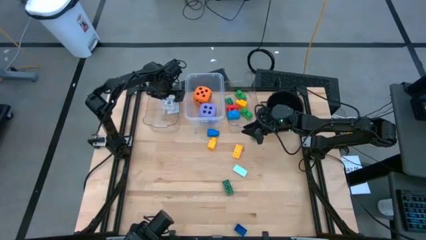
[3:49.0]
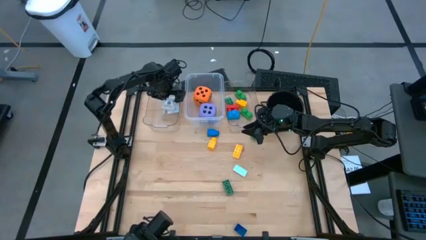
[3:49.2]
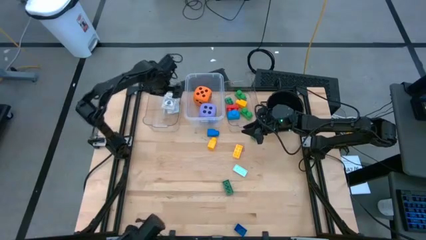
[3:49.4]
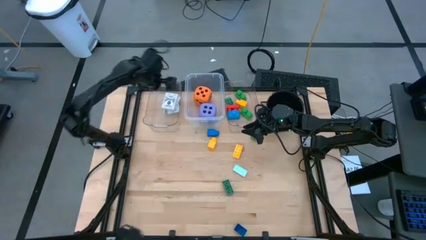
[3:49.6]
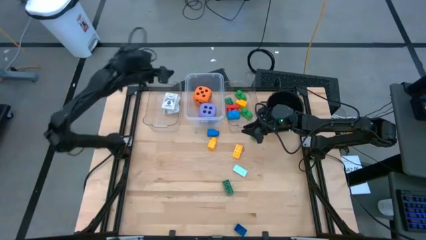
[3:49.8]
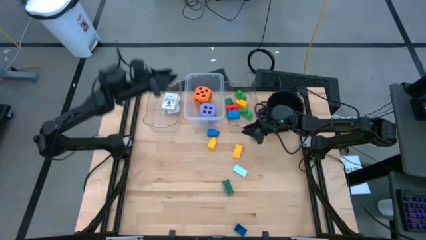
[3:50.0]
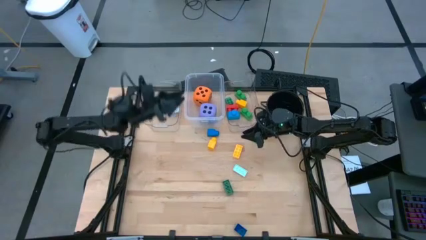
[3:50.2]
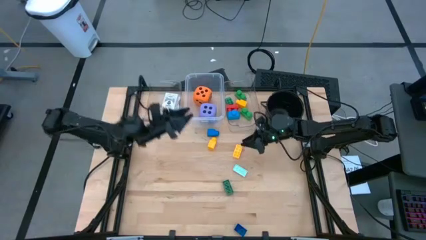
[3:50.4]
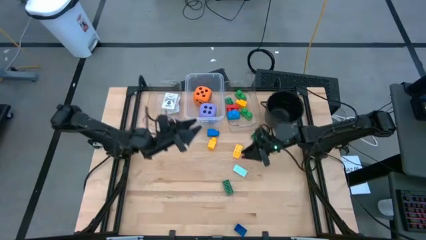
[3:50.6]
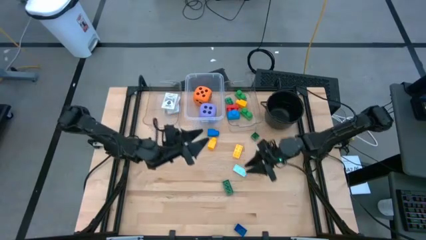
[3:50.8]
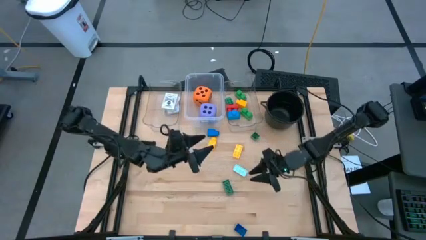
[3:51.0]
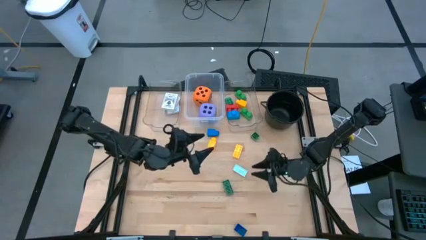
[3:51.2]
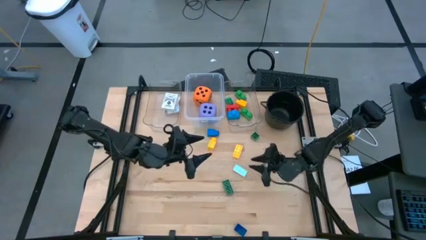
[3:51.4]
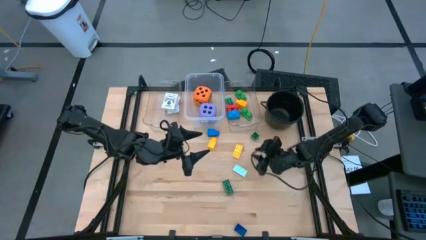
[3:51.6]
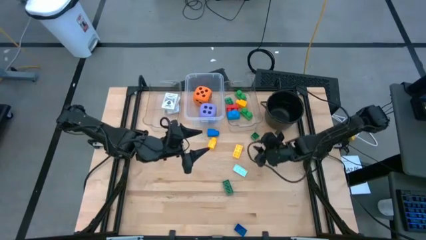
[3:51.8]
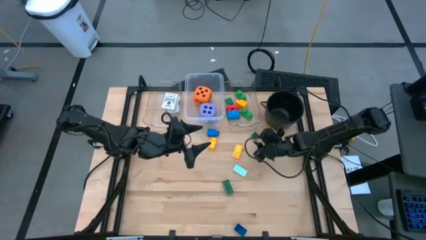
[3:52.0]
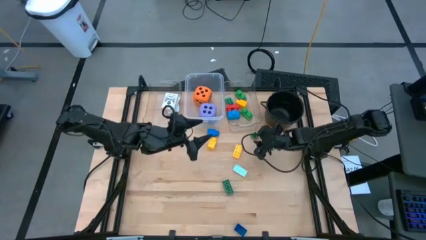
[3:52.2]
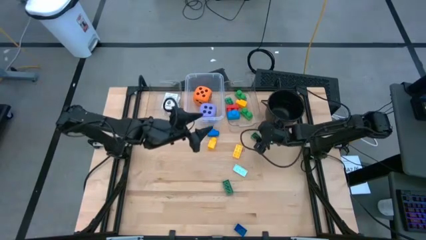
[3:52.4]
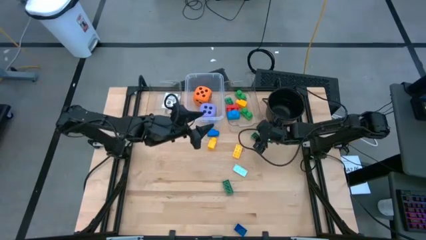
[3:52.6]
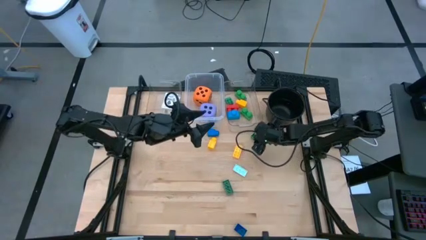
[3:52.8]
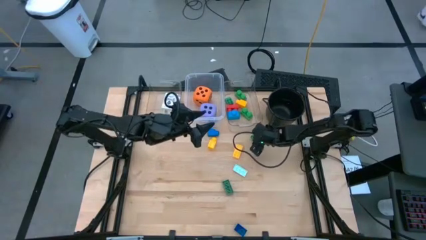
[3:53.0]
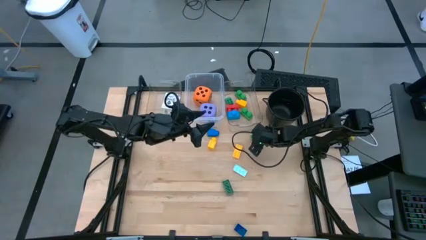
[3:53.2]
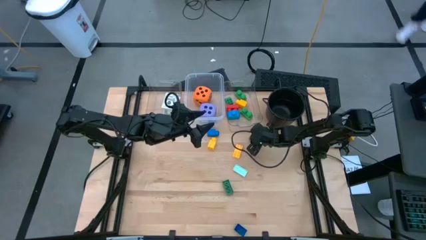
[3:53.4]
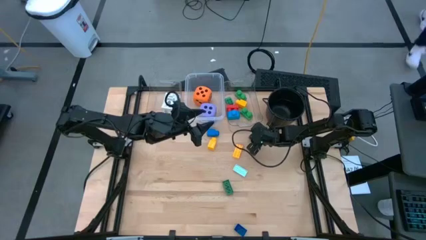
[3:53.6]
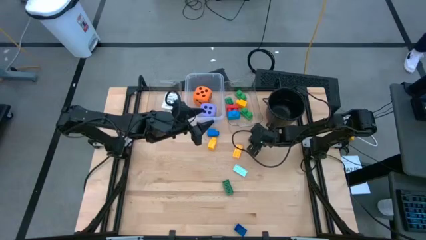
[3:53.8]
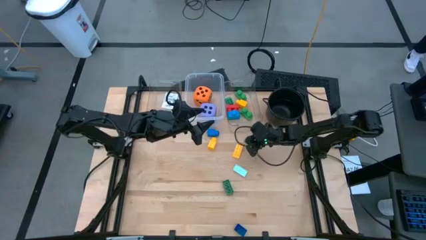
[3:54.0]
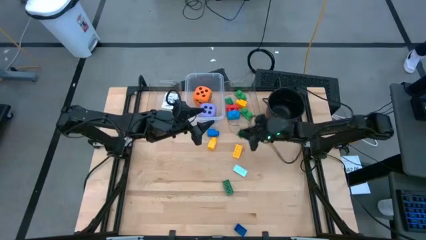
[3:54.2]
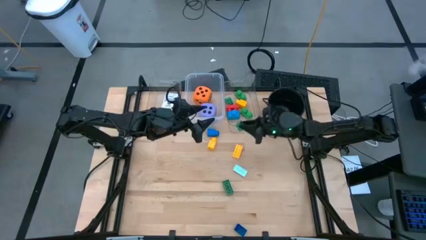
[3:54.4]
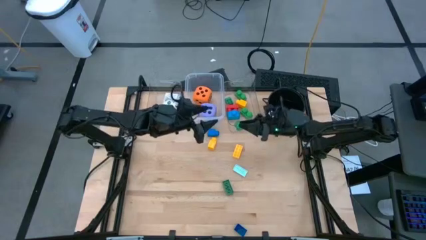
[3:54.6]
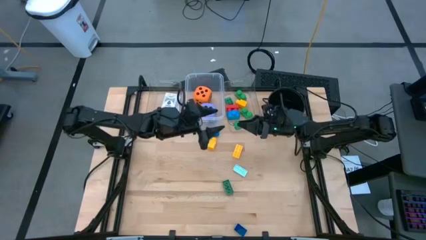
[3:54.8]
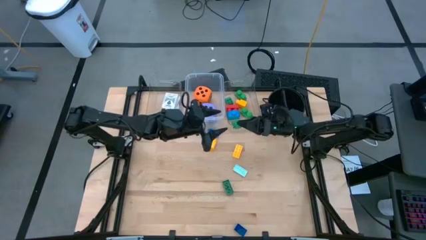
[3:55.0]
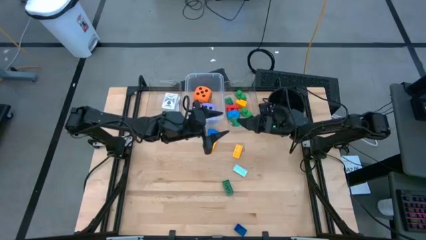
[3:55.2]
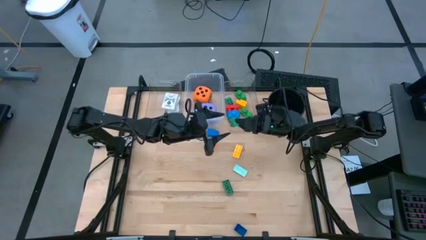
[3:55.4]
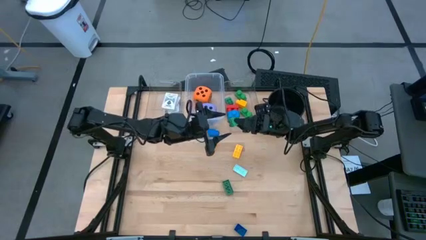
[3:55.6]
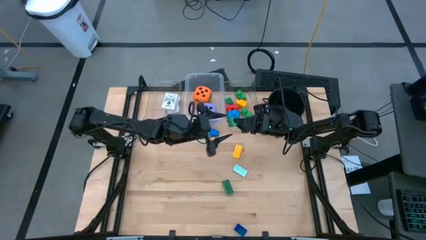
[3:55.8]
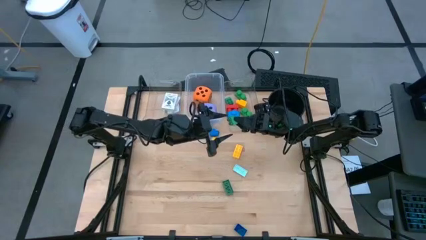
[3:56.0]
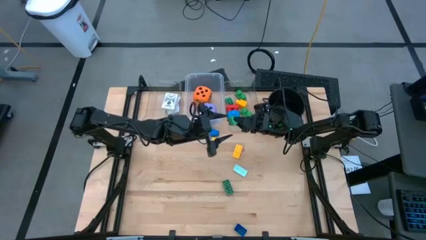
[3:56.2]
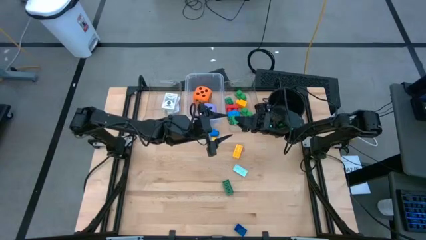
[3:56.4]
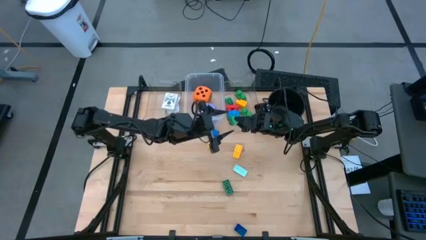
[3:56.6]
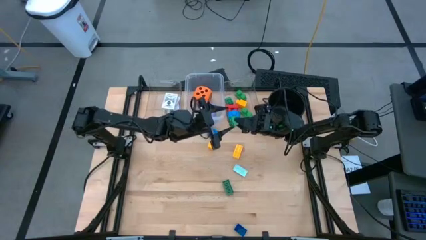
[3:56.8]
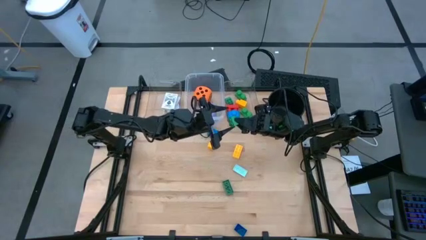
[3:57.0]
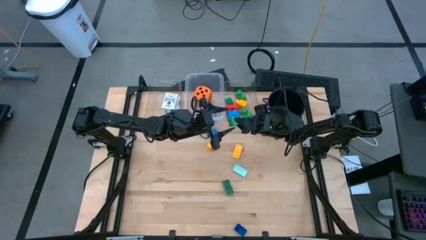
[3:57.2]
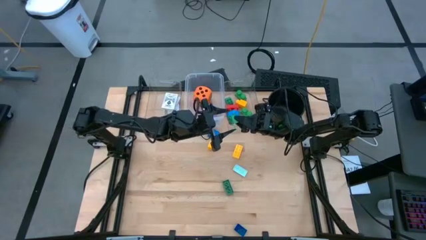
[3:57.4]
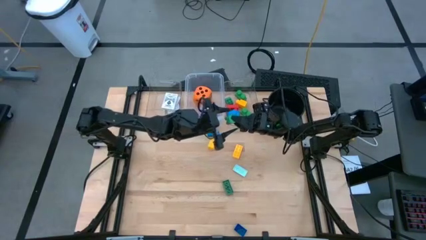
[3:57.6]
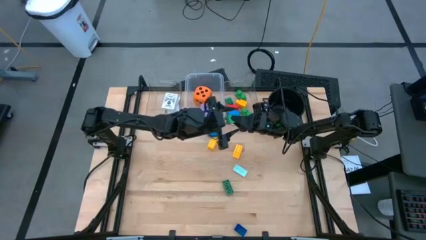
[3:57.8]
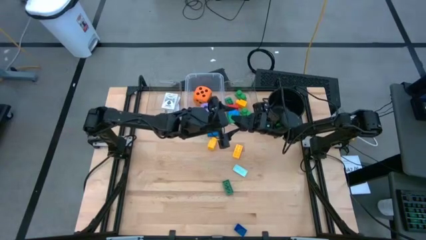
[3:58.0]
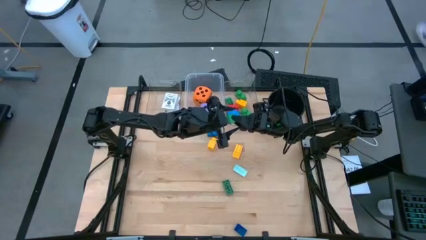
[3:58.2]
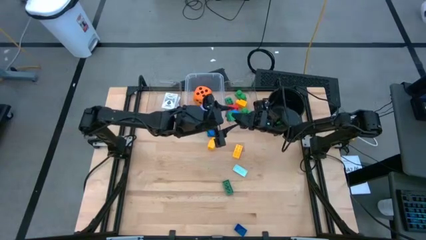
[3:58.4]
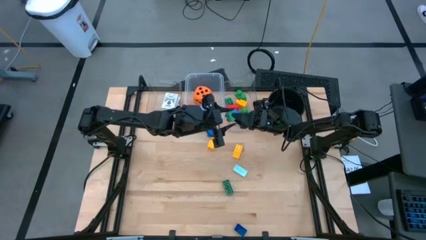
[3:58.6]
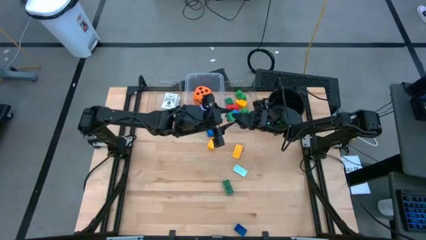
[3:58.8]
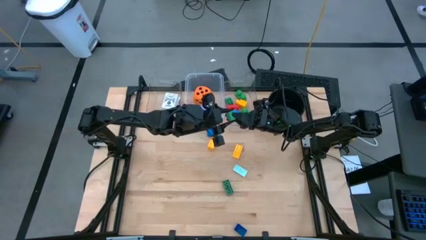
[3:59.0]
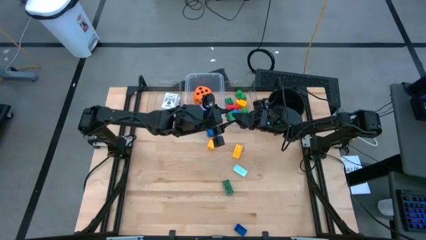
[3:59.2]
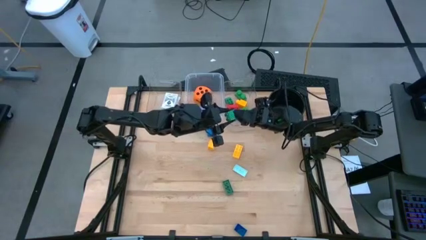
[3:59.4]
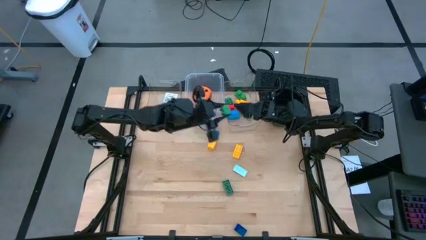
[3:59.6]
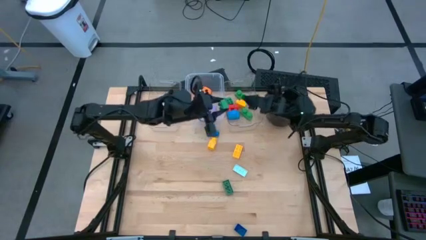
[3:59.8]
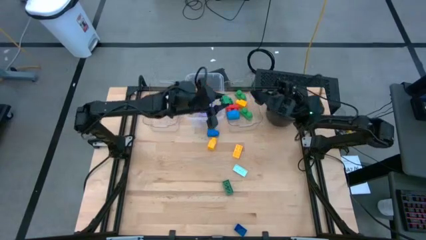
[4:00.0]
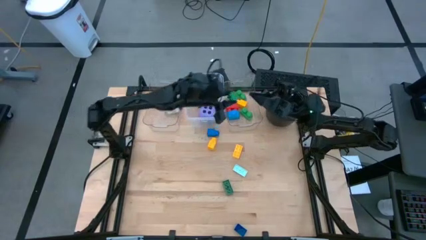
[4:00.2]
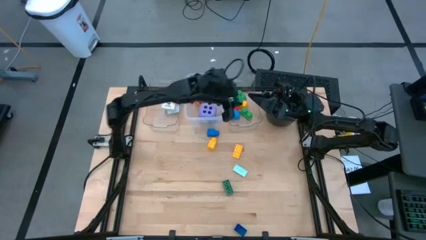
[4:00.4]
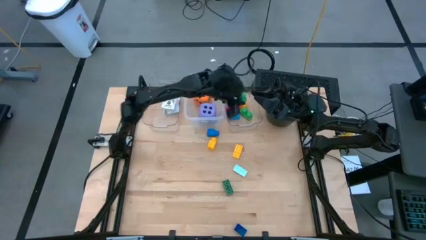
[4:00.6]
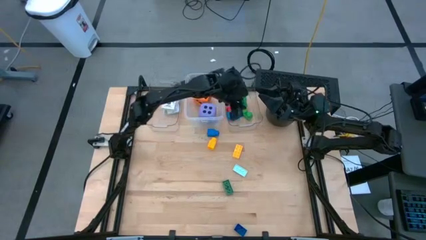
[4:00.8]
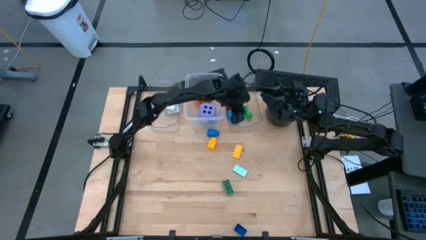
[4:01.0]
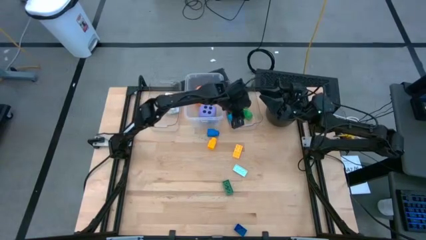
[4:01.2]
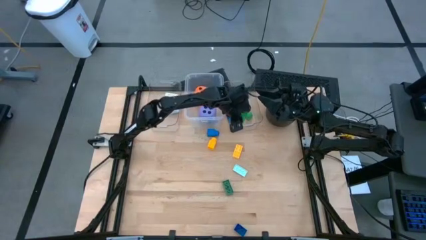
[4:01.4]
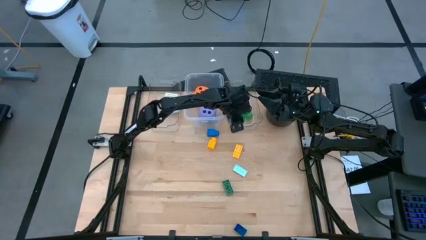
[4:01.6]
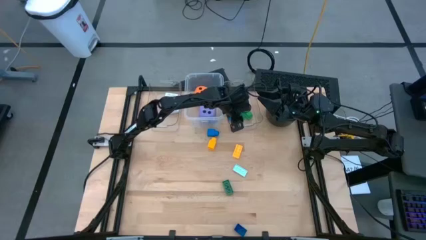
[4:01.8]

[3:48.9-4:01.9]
Task: Pick & Place Toys
Put the top dark green game piece into the right transparent bin
